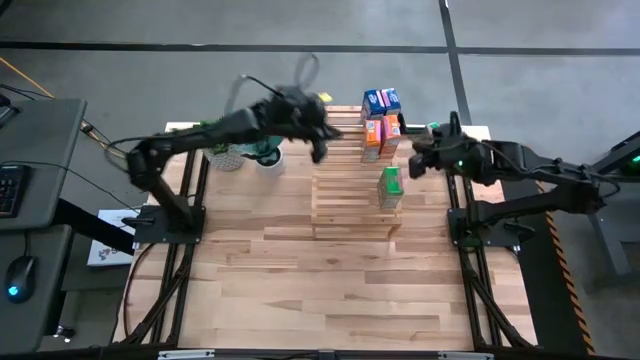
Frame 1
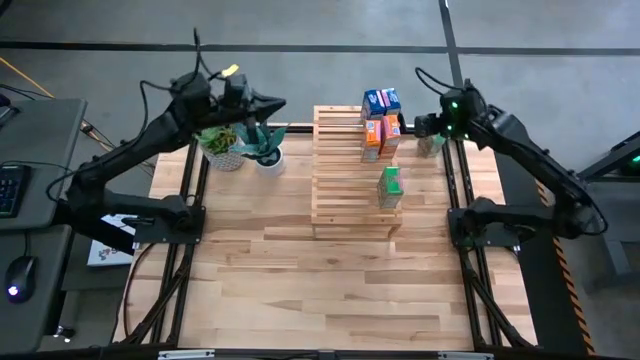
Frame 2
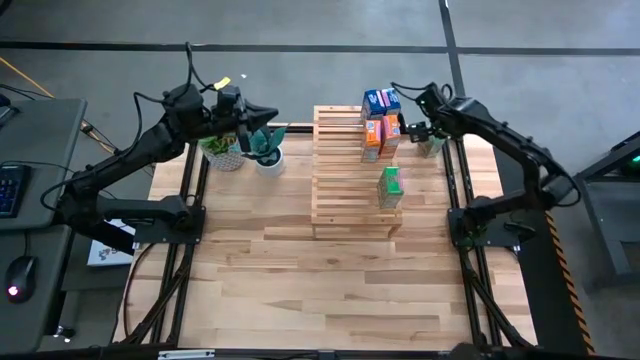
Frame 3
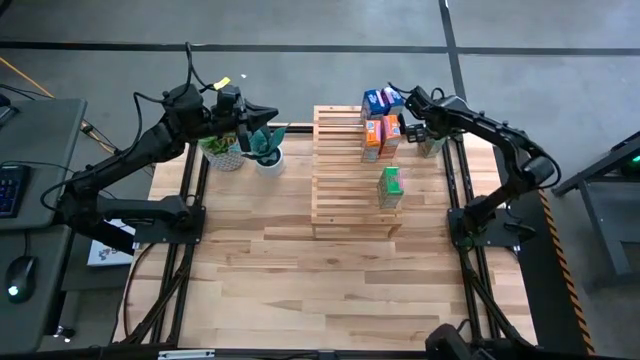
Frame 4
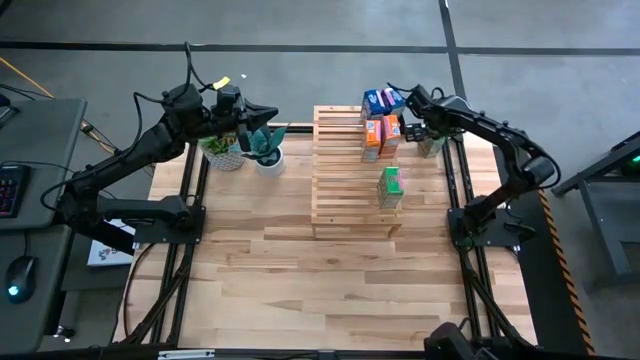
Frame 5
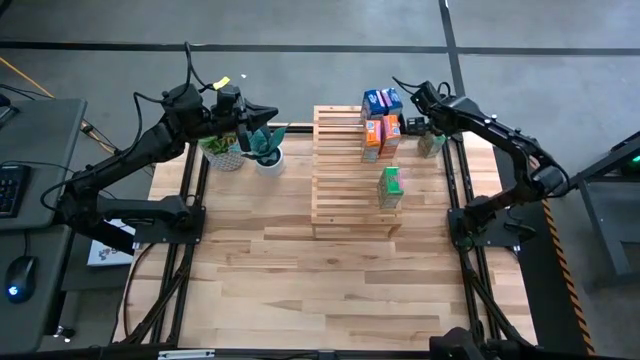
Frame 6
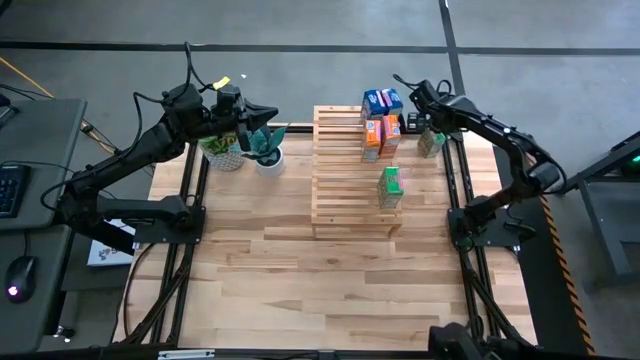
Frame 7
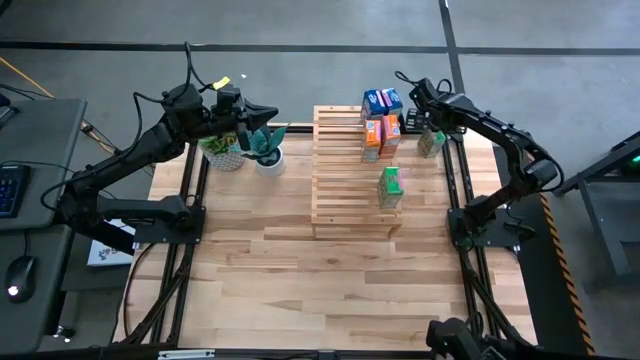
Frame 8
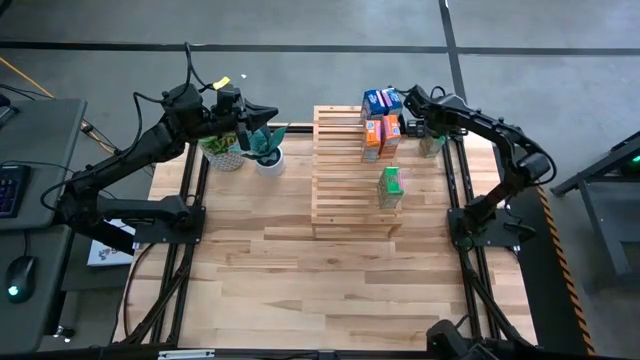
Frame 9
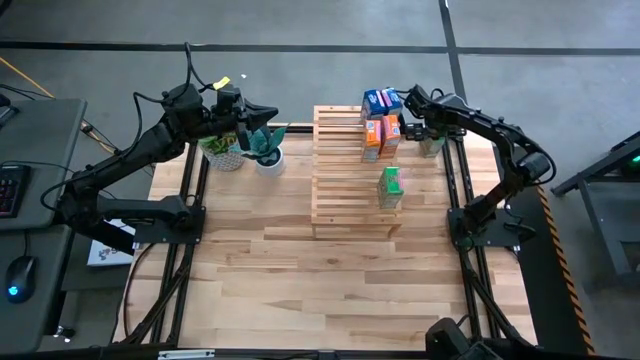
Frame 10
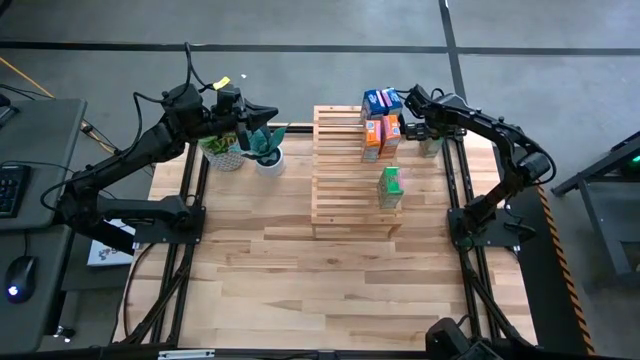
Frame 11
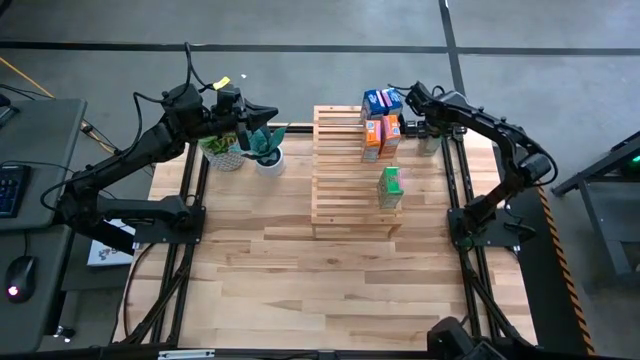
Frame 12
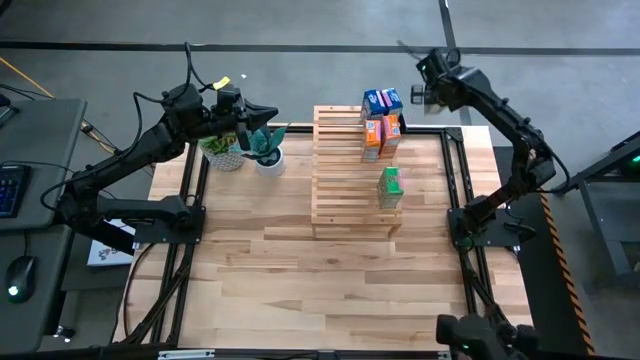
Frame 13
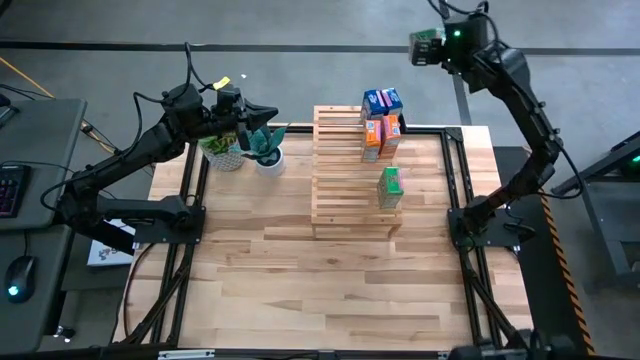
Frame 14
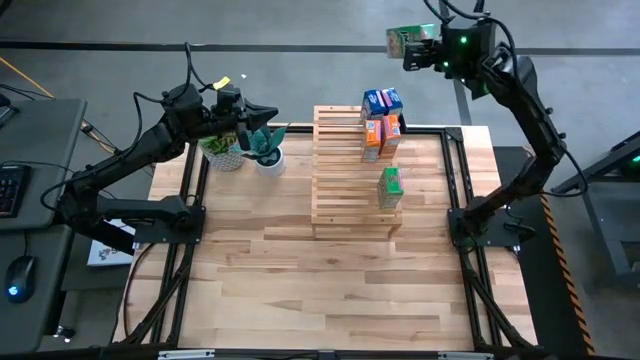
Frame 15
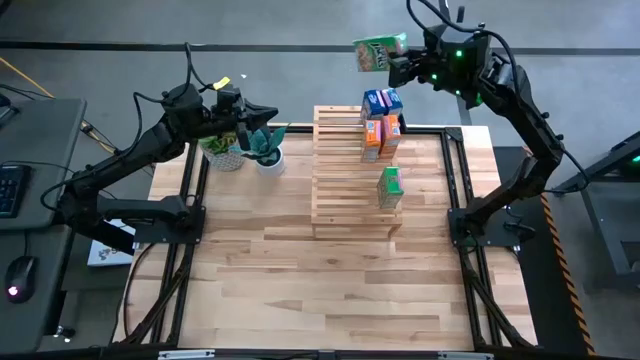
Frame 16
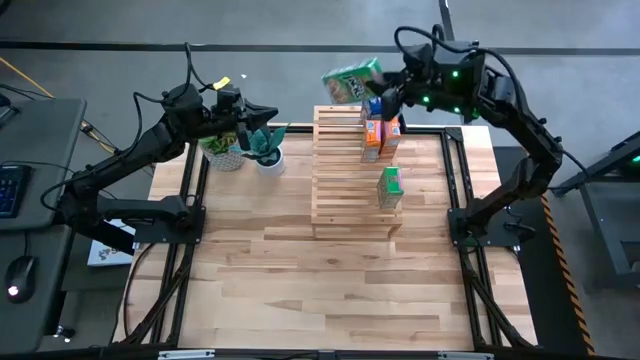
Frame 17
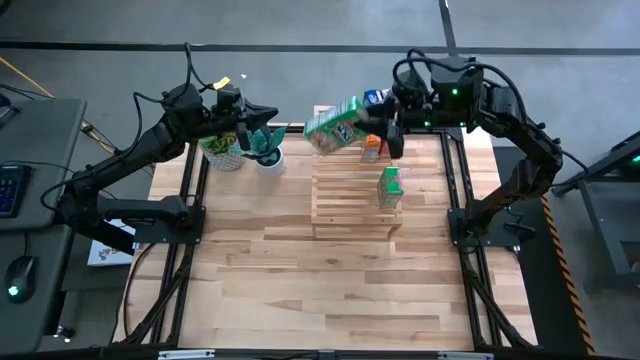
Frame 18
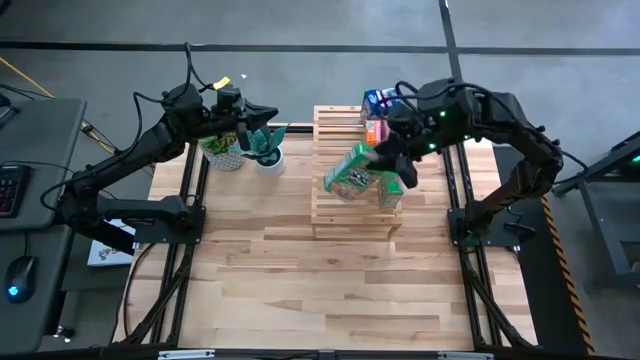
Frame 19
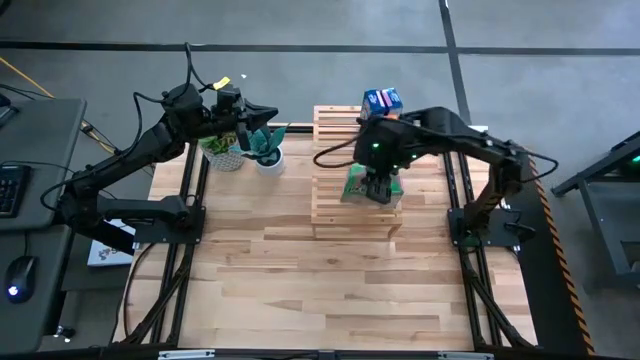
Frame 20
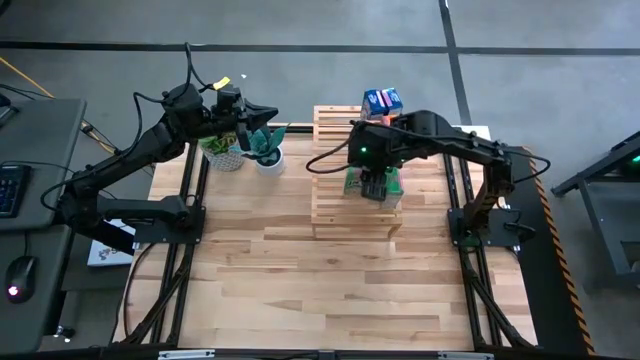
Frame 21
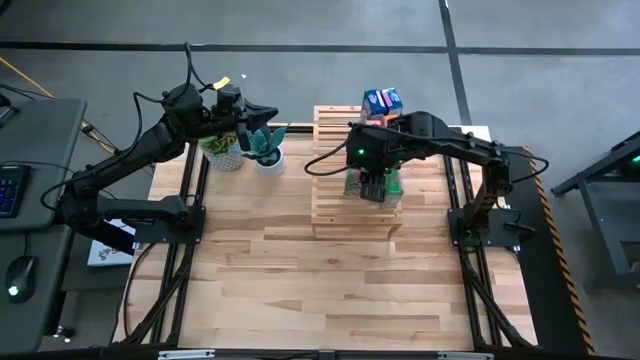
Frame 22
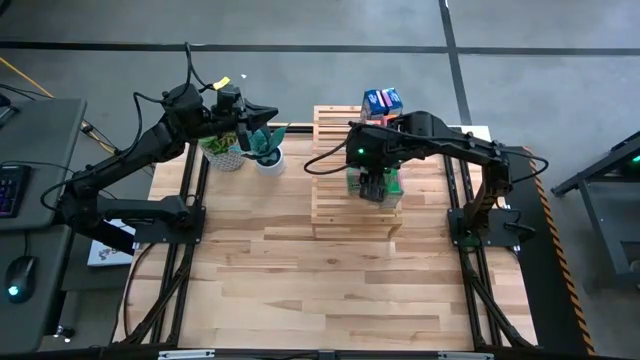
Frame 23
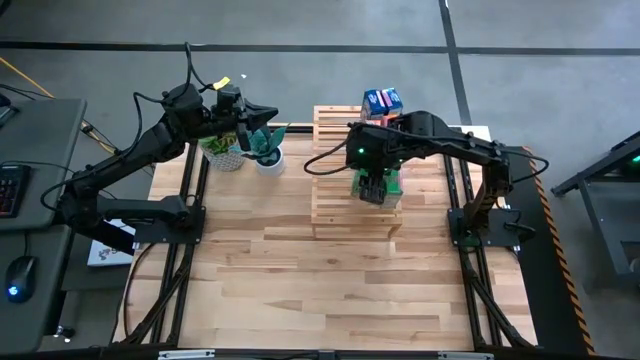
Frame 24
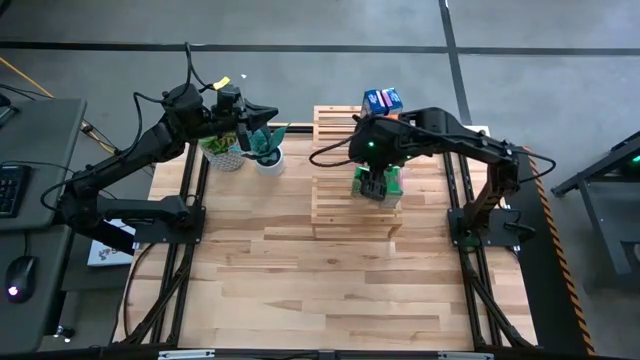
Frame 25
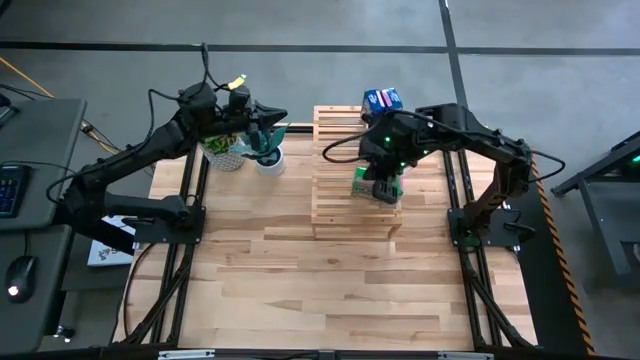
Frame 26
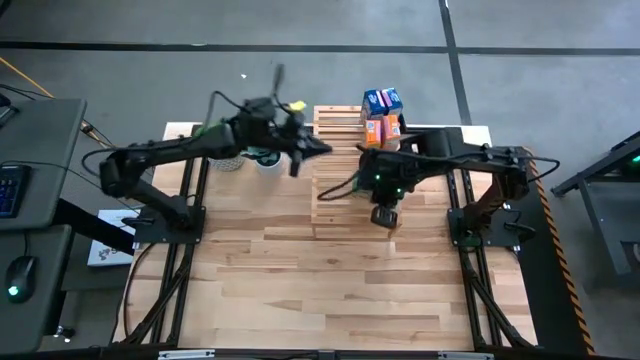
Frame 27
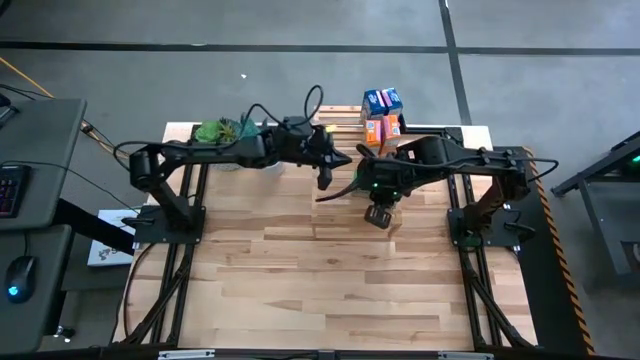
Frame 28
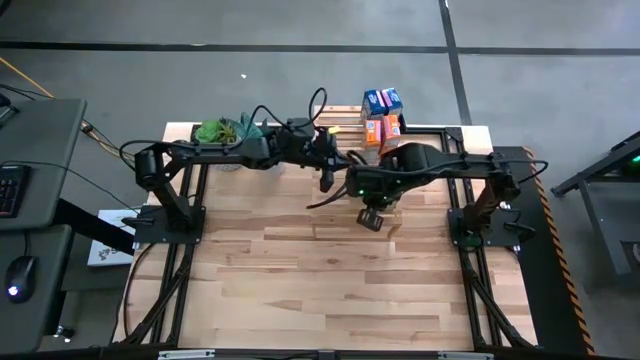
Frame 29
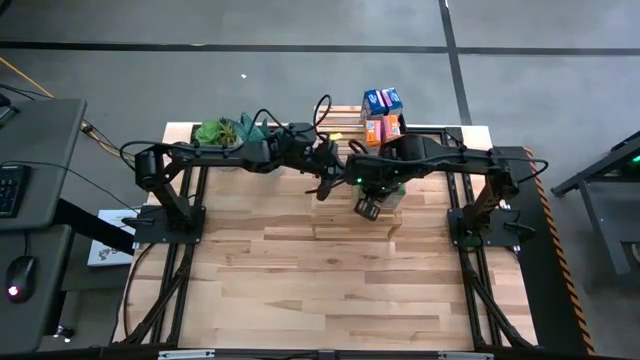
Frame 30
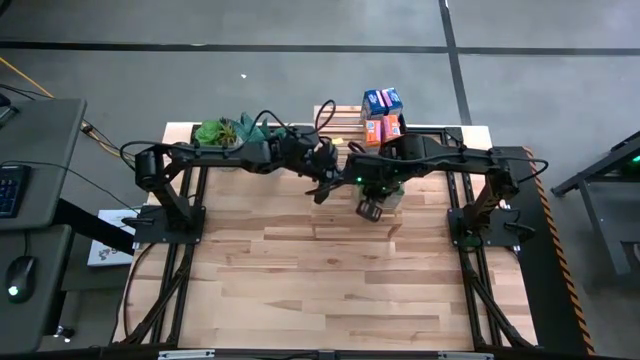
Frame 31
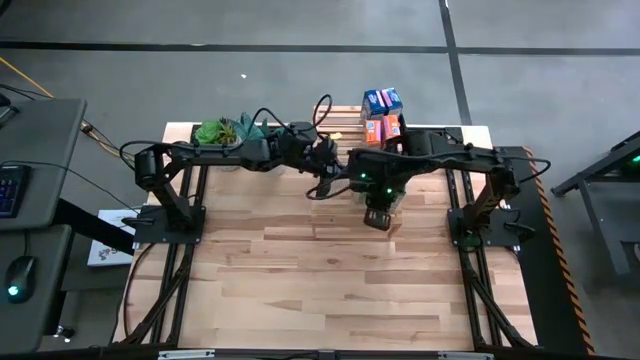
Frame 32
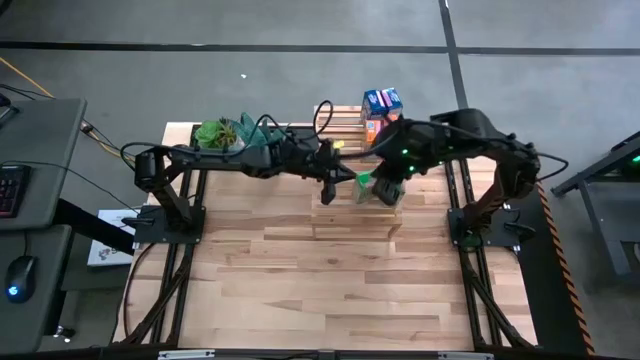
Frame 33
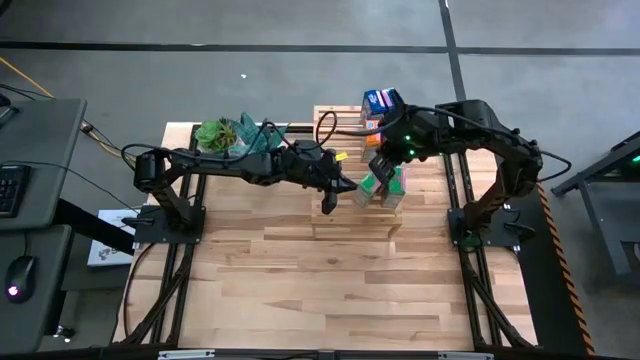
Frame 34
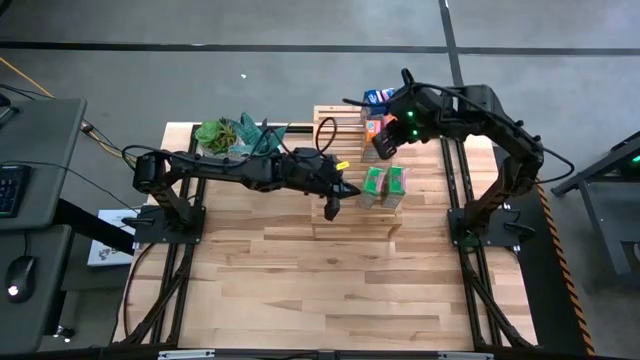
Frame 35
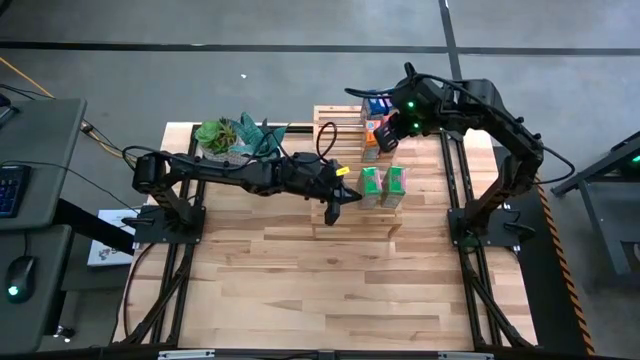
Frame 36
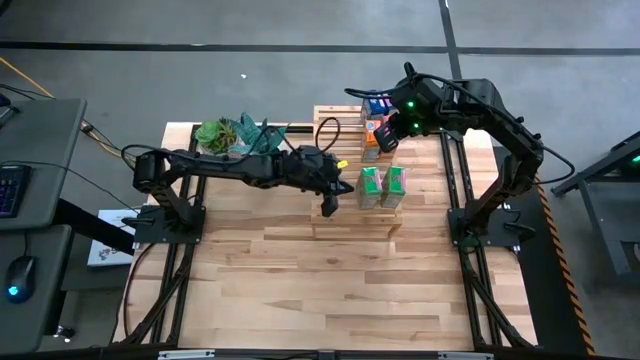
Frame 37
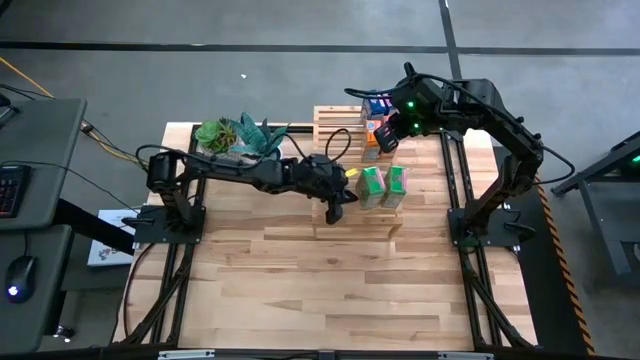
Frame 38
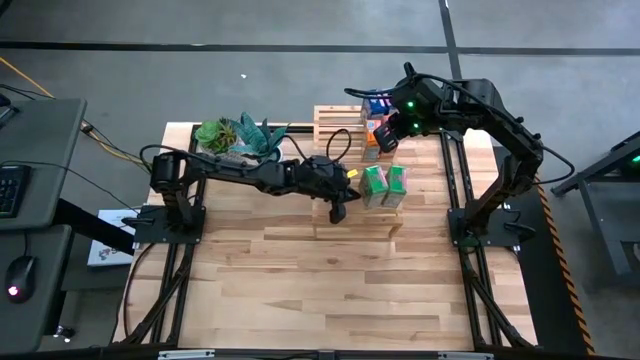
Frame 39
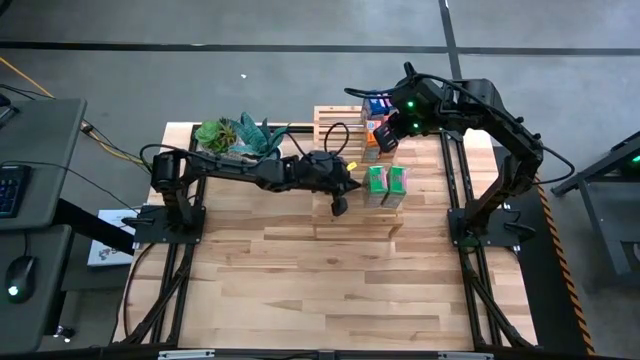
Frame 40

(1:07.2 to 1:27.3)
Task: Stack cereal on shelf
Put the green cereal box aligned with the other green cereal box on the shelf

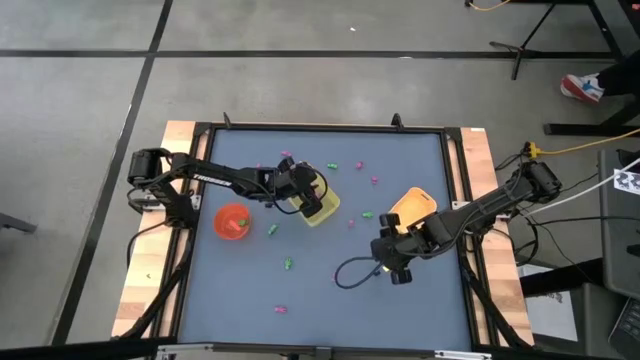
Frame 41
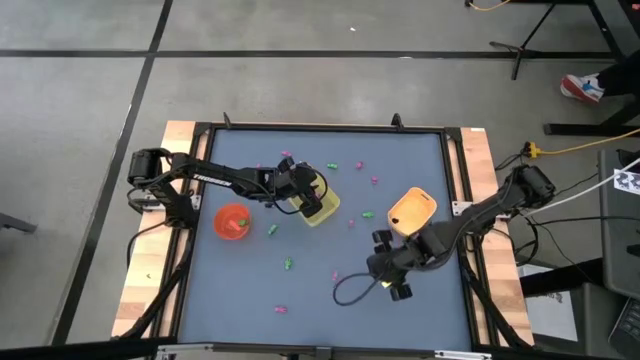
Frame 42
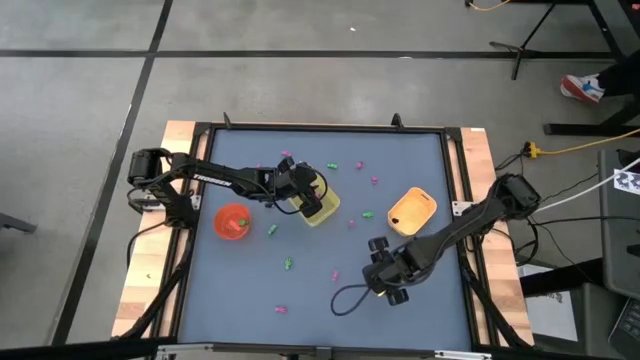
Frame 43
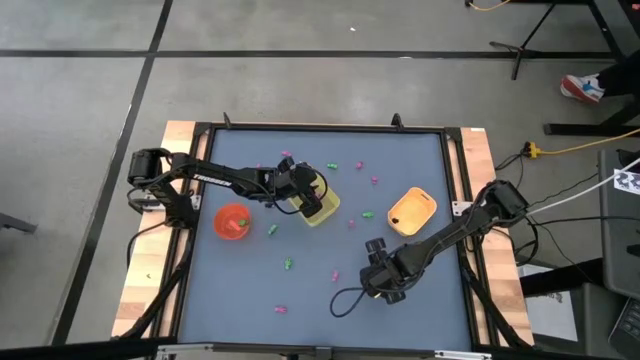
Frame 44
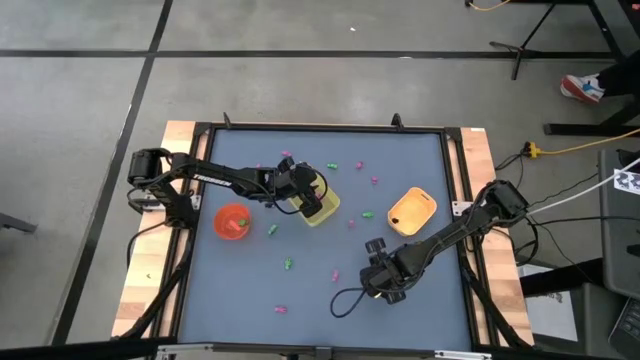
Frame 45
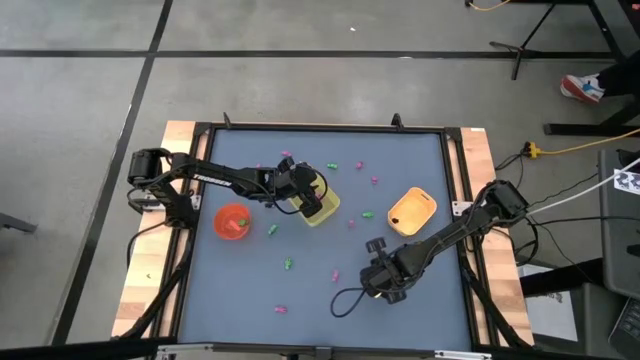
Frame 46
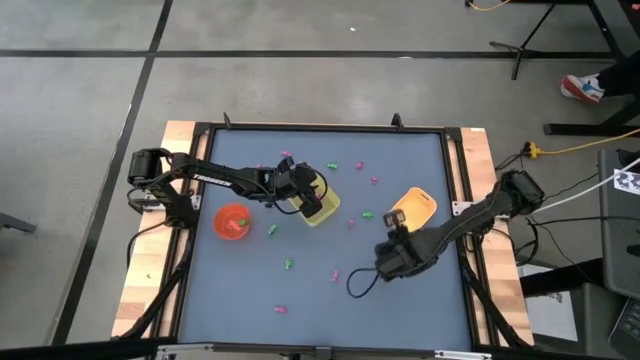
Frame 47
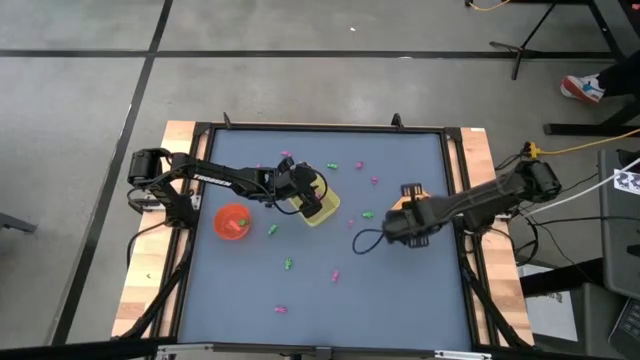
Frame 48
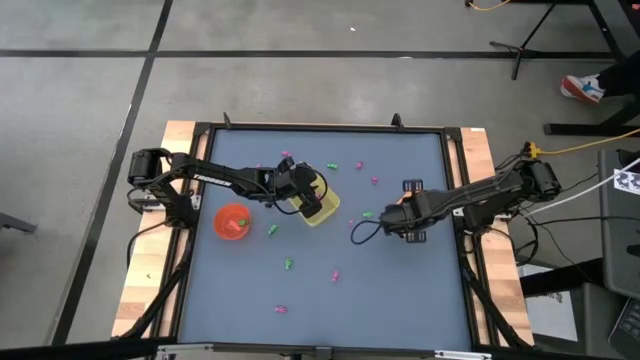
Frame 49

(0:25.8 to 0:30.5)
Task: Sort Halloween decoration
Put the black skeleton toy into the yellow-orange bin
